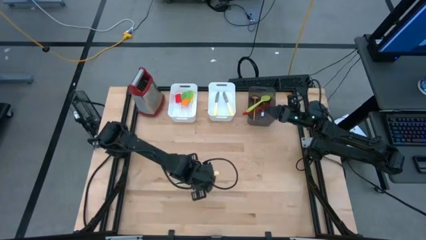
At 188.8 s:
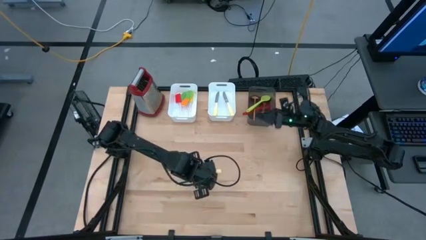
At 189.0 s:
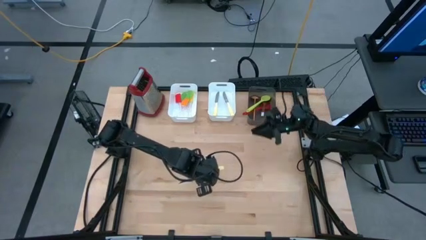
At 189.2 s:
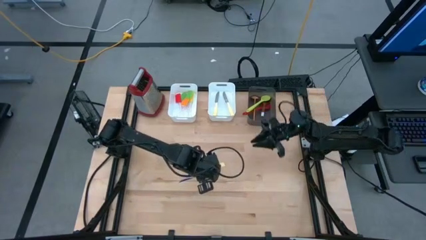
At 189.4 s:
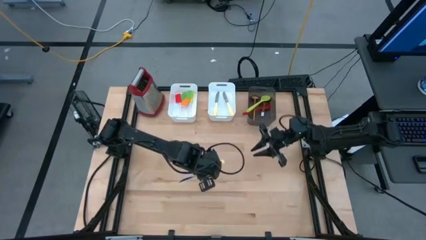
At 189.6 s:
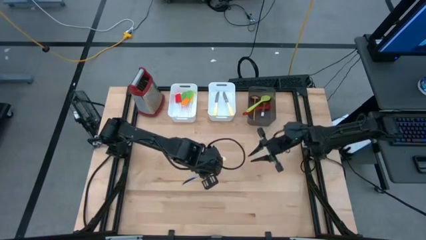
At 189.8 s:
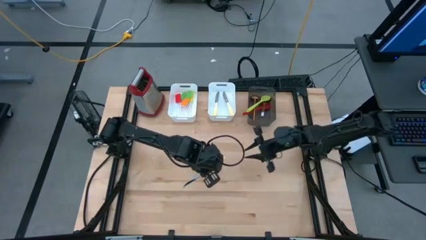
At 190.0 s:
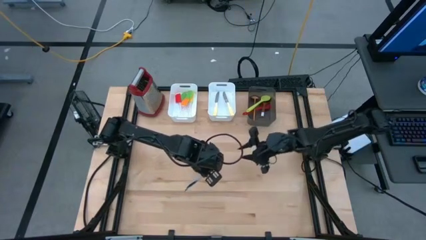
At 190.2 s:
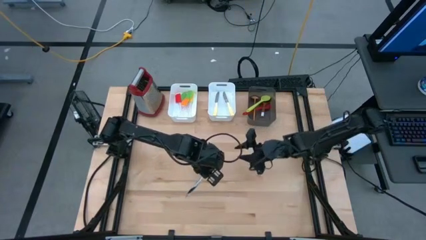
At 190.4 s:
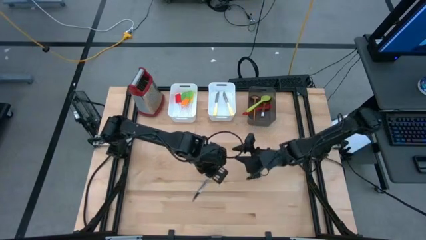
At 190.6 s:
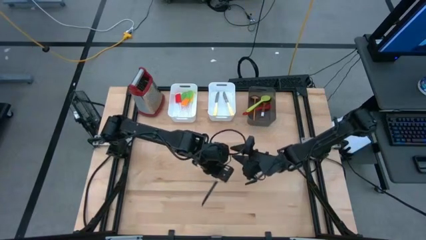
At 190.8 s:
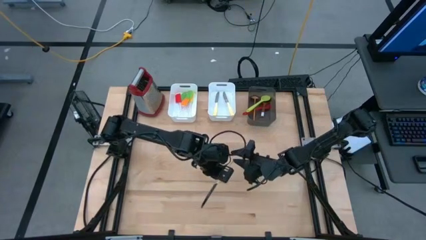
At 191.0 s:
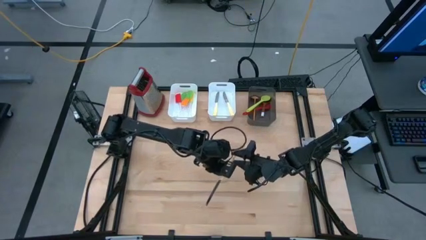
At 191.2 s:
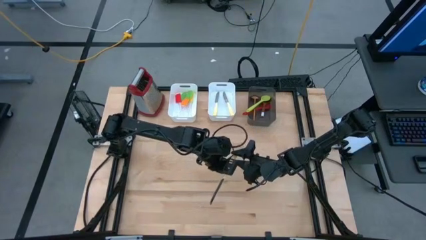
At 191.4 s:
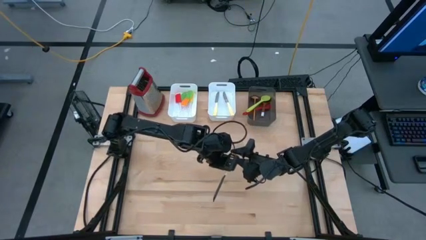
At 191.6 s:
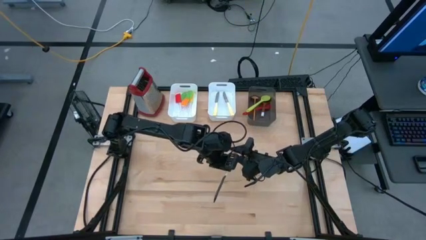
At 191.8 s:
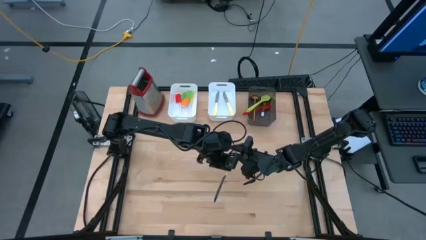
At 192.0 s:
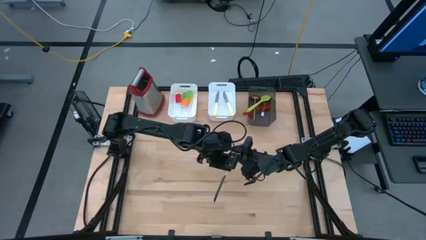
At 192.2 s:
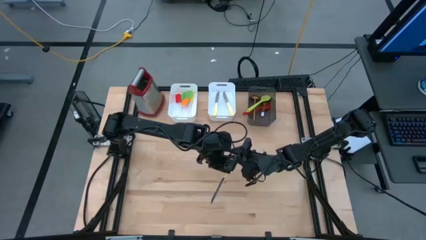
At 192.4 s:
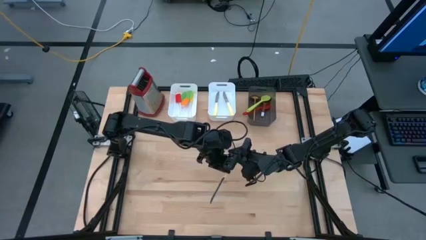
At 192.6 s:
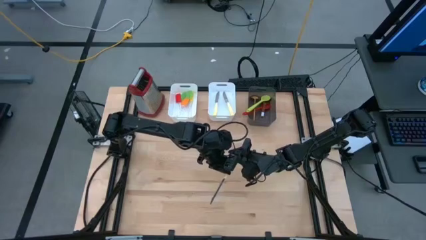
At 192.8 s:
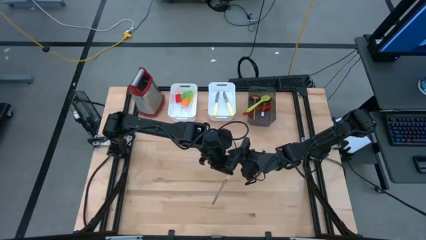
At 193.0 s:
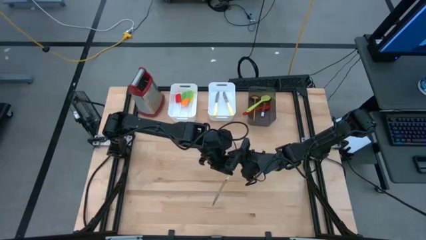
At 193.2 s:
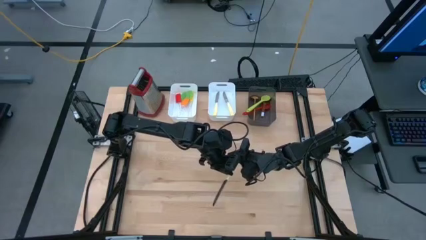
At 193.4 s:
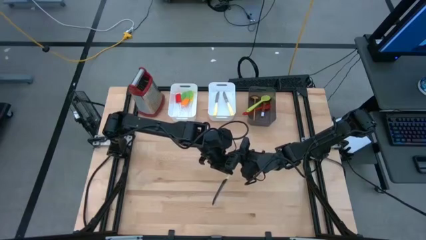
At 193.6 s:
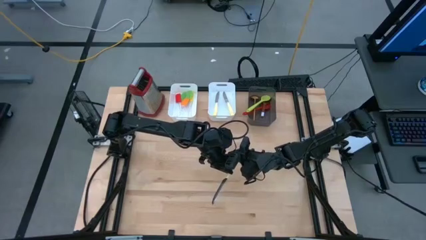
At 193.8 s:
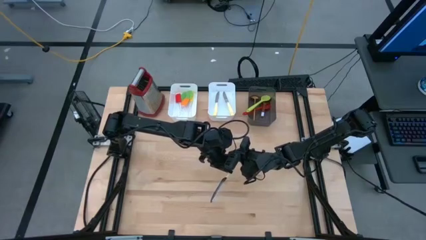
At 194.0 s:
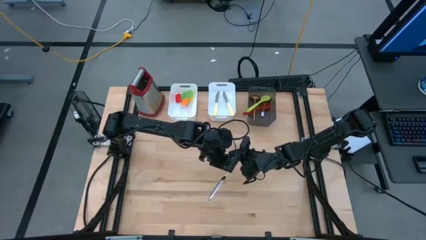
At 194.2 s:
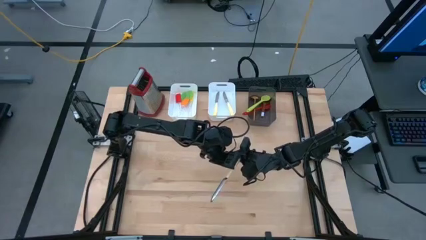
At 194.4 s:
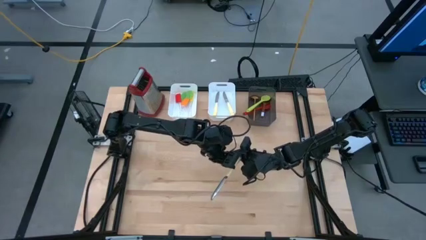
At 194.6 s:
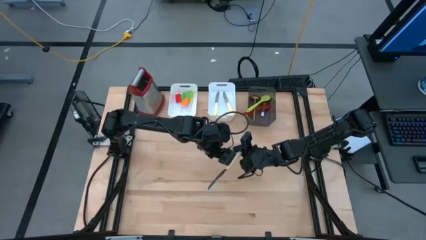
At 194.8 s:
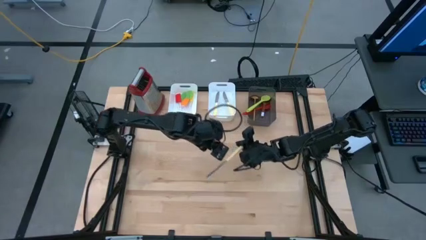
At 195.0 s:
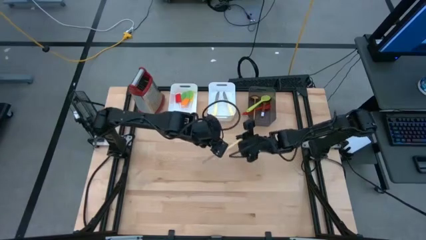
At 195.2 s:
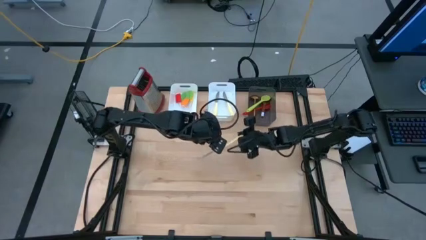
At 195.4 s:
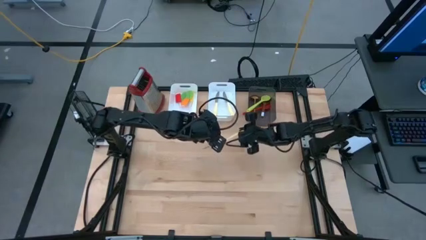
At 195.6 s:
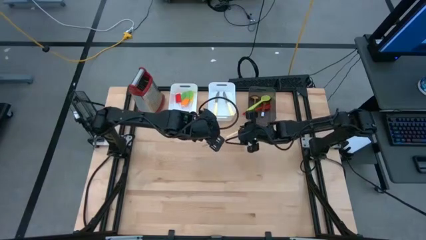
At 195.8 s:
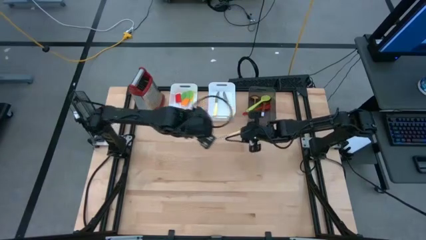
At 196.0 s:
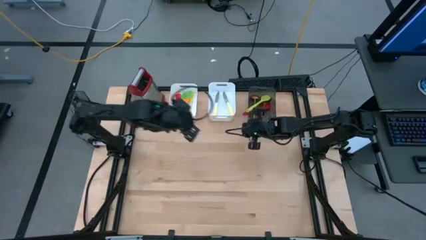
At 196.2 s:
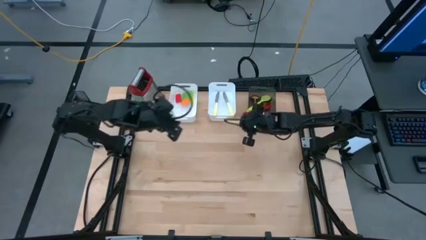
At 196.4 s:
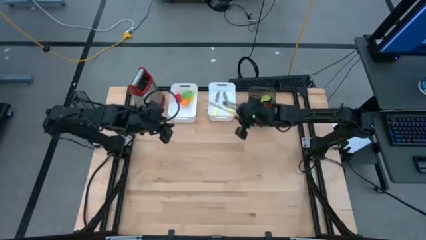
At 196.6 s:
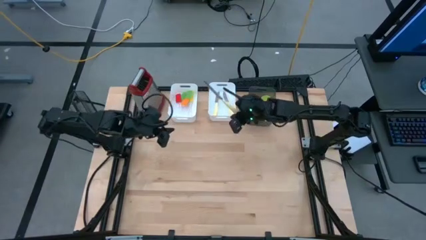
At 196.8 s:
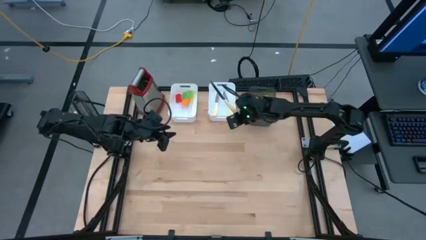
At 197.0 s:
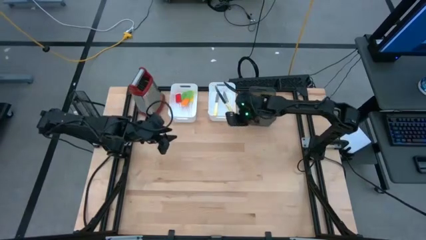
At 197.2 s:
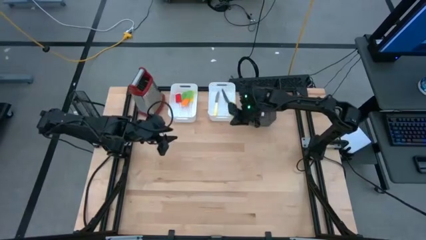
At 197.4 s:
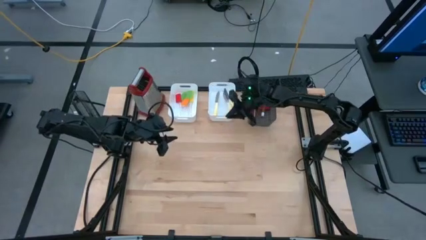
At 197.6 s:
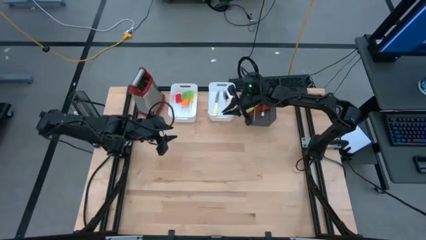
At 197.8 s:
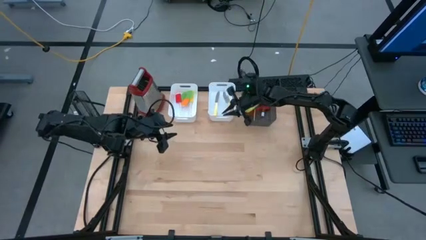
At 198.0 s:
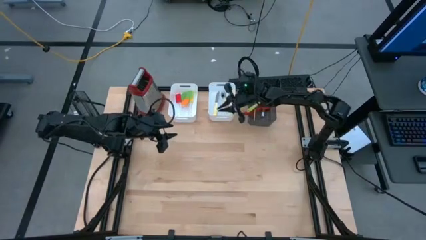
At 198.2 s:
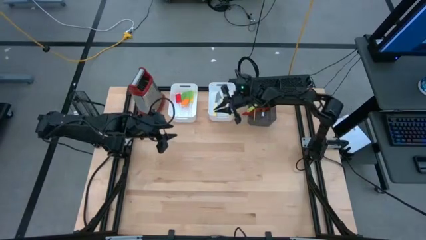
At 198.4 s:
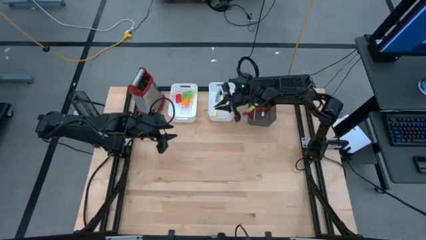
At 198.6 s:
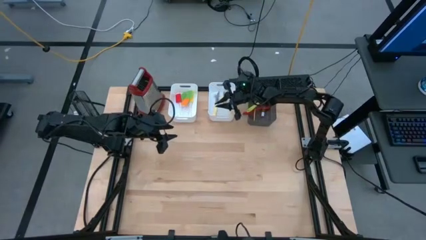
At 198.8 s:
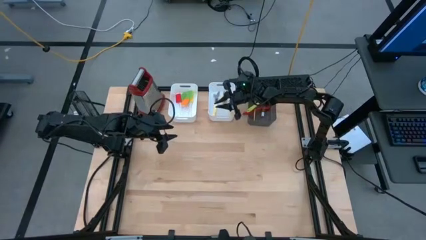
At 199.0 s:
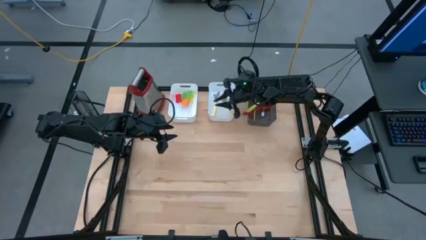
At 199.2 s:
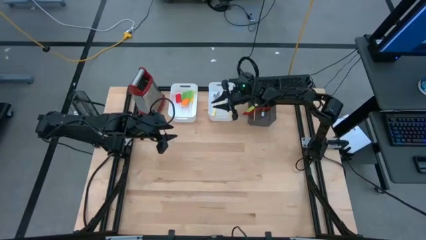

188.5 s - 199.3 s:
Task: Pick & Place Kitchen Items
Put the knife into the right white bin

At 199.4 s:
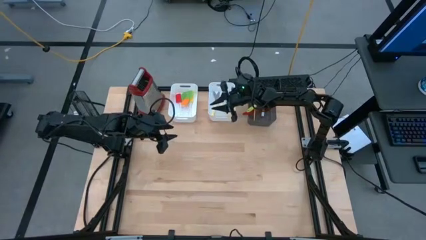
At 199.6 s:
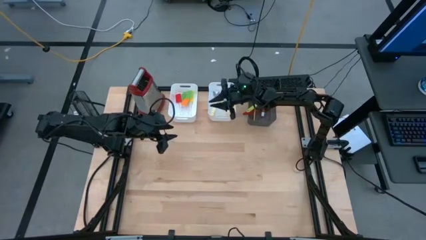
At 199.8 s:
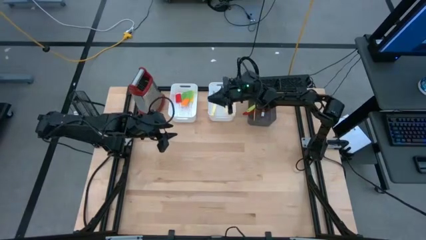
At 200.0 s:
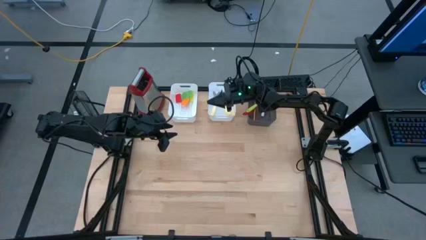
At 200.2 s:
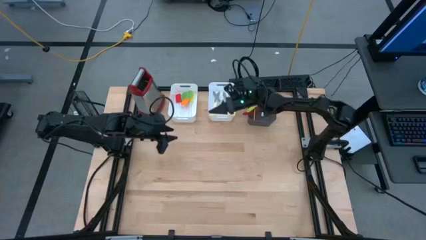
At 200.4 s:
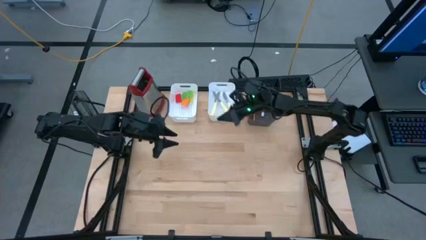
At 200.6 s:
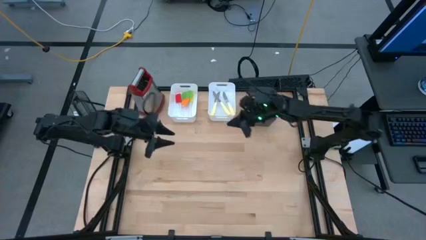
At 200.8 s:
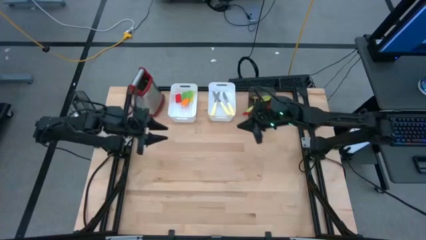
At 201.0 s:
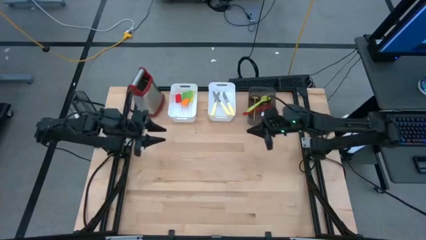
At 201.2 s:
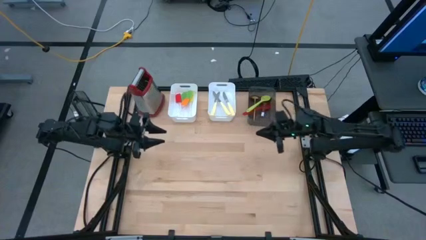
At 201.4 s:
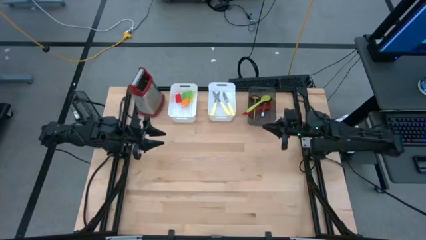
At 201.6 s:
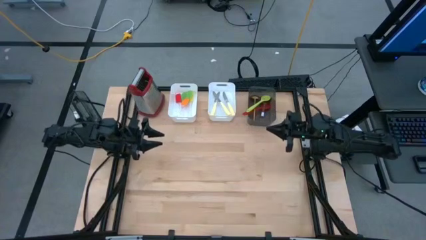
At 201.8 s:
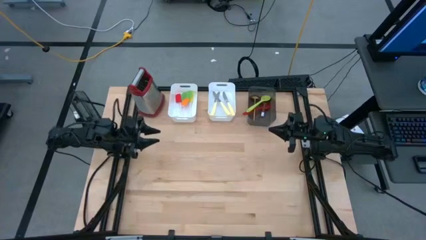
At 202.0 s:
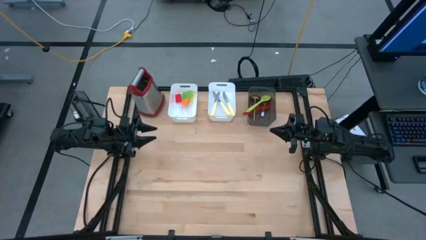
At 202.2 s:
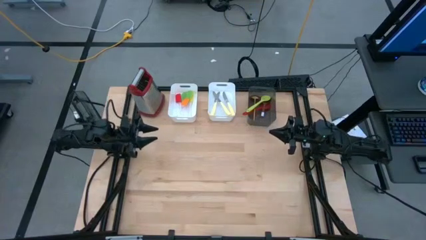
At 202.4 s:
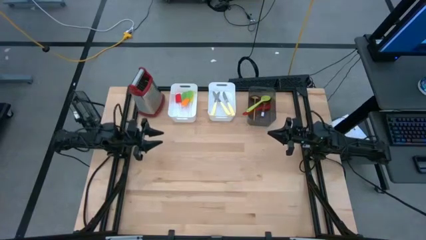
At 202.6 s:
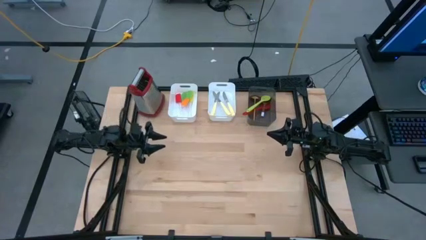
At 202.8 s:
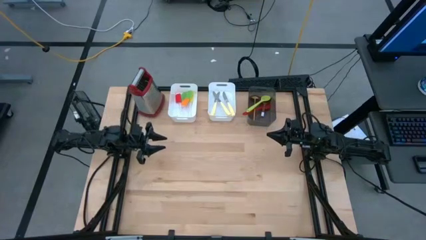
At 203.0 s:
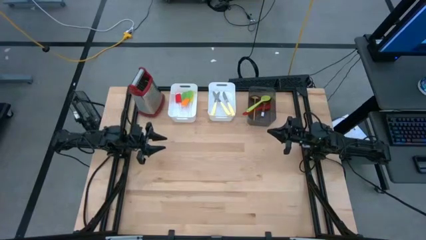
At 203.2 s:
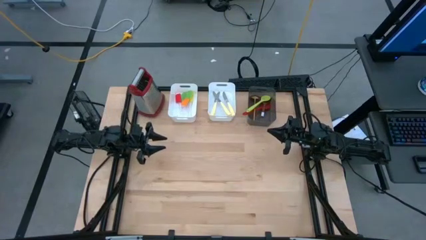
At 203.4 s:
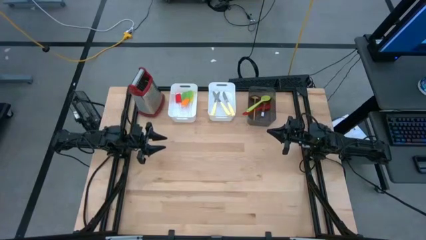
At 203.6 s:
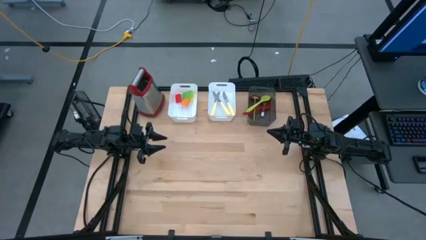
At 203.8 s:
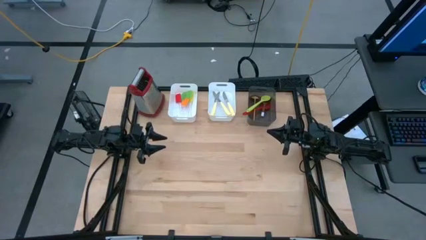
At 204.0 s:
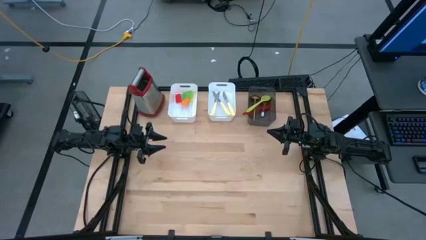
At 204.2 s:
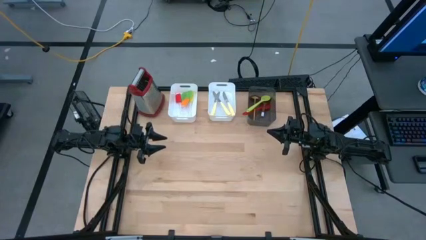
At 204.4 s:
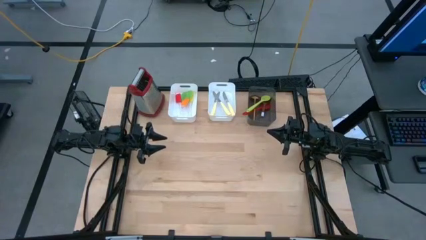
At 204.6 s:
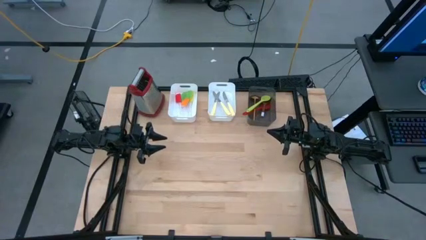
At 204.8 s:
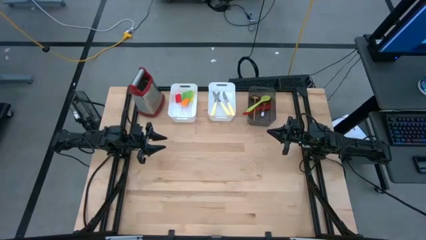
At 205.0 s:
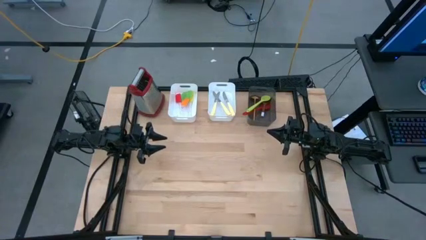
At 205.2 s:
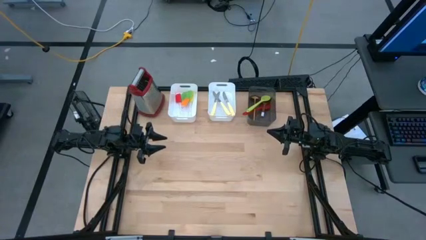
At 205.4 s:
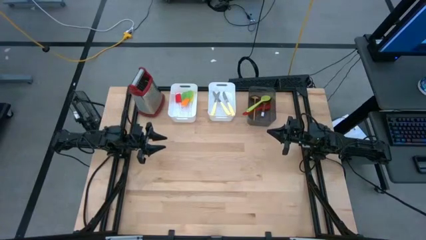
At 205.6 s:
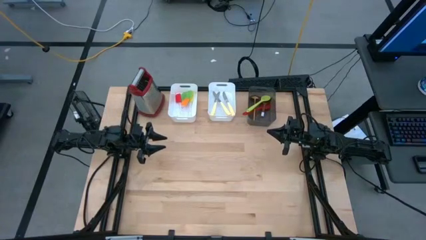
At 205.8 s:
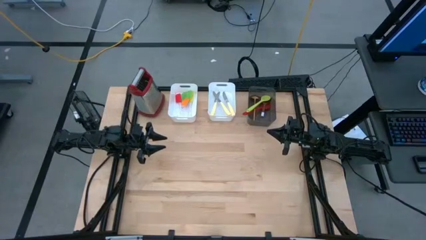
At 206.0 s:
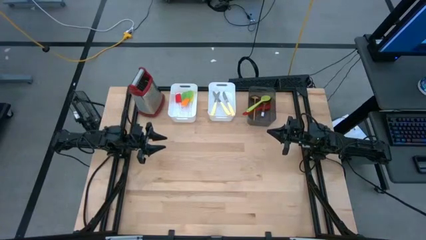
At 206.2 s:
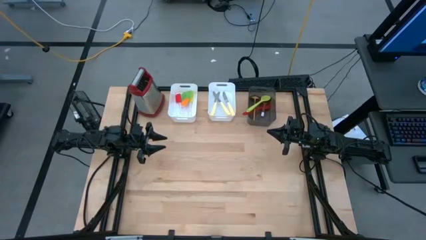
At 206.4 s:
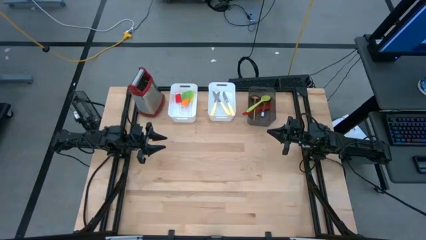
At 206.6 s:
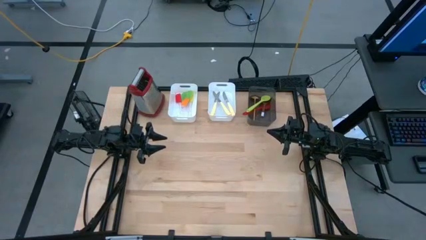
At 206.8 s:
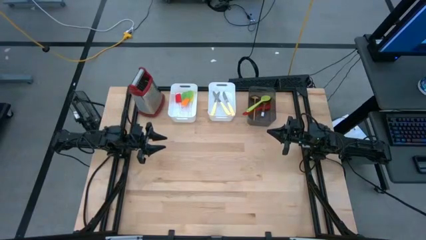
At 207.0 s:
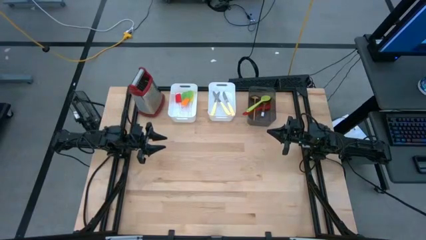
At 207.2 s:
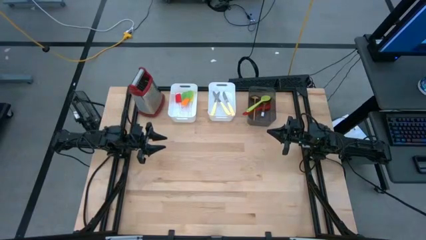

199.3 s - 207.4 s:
Return to Home Position
